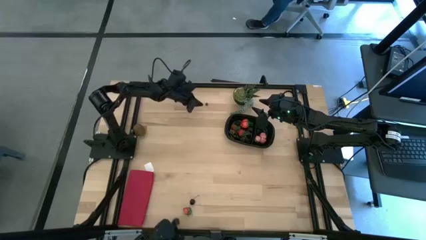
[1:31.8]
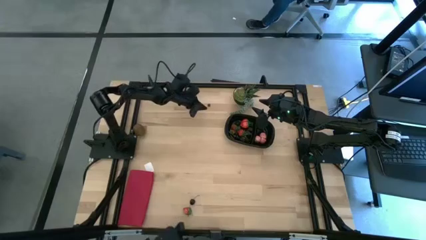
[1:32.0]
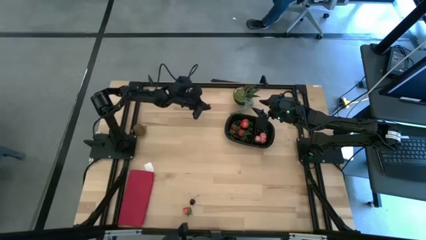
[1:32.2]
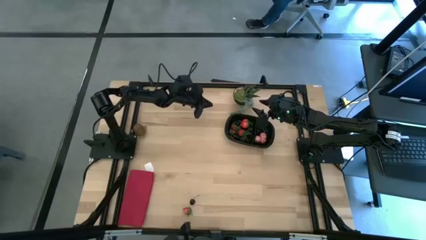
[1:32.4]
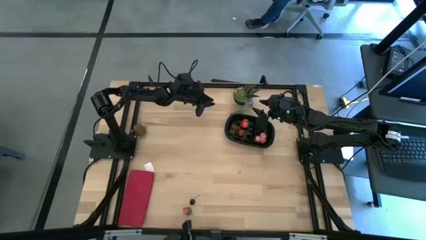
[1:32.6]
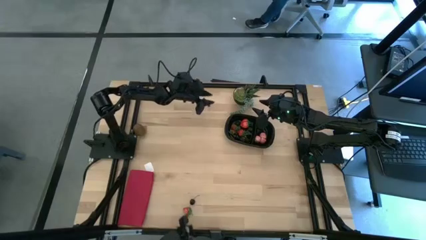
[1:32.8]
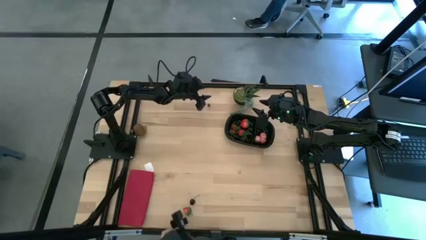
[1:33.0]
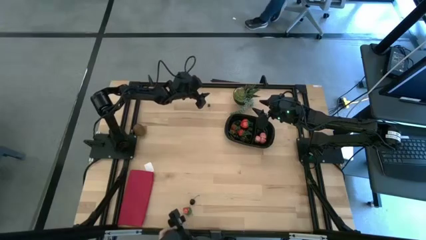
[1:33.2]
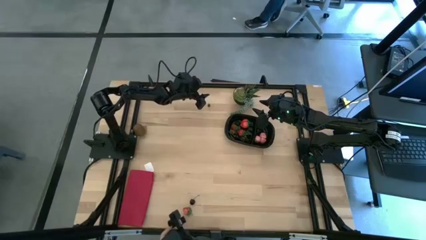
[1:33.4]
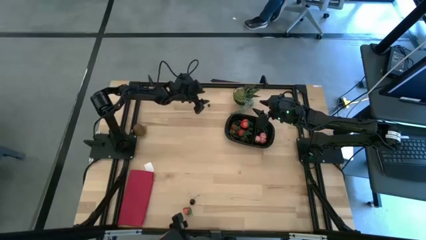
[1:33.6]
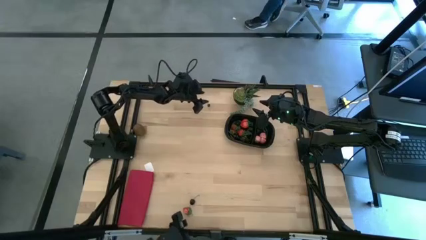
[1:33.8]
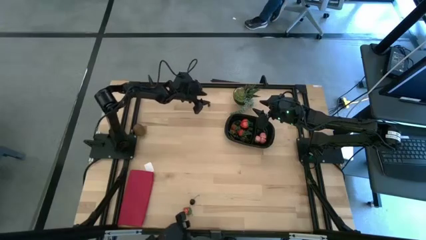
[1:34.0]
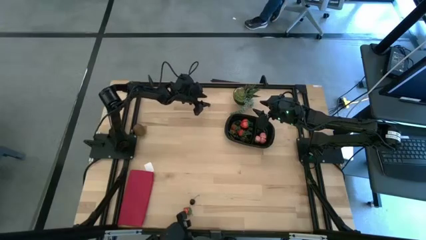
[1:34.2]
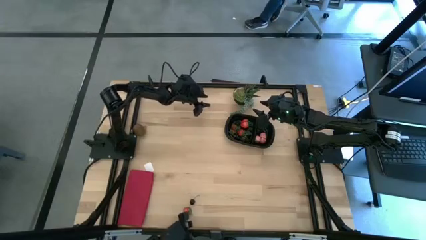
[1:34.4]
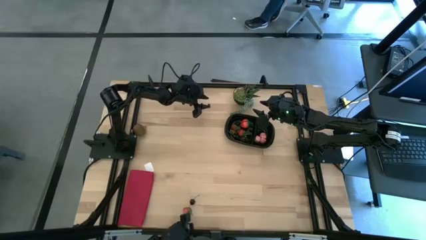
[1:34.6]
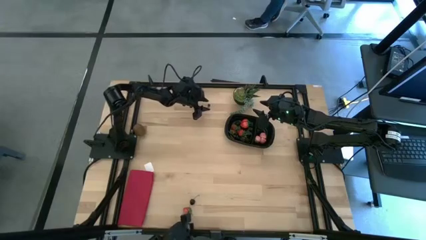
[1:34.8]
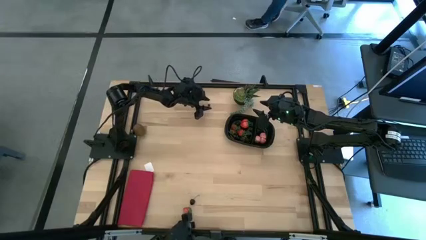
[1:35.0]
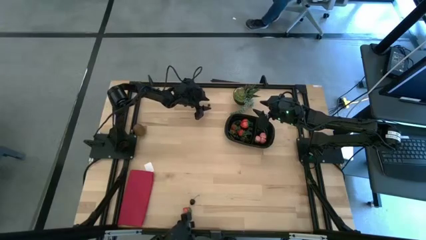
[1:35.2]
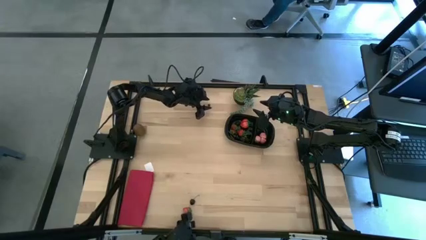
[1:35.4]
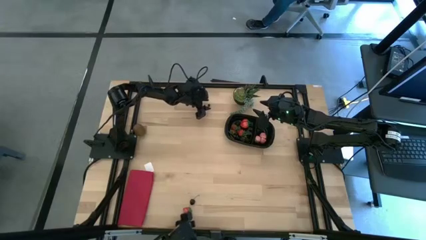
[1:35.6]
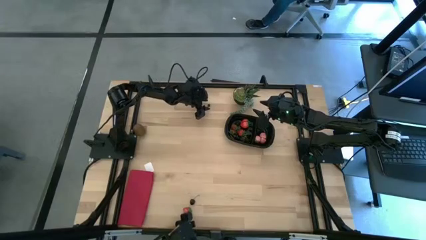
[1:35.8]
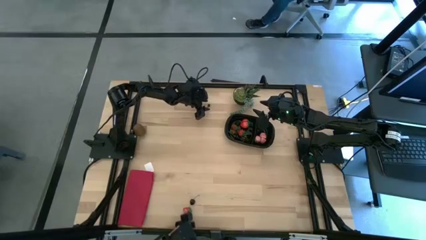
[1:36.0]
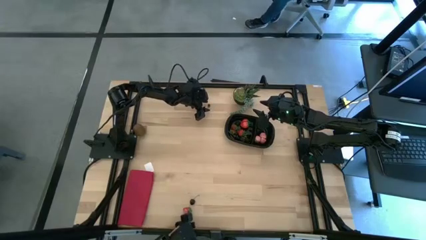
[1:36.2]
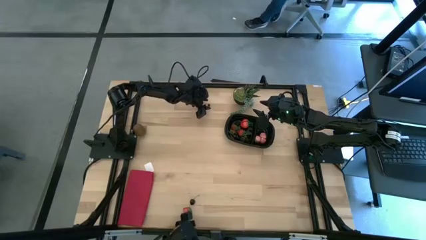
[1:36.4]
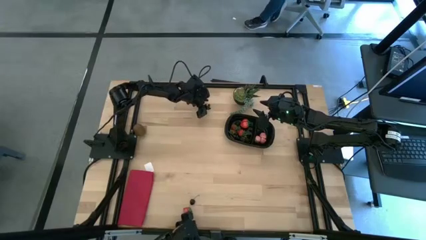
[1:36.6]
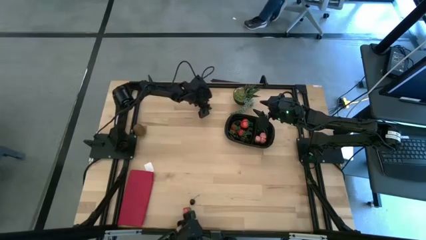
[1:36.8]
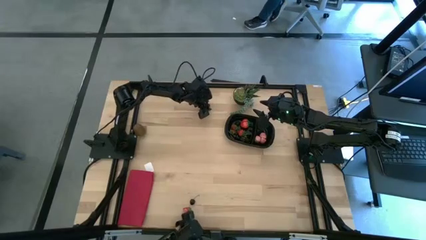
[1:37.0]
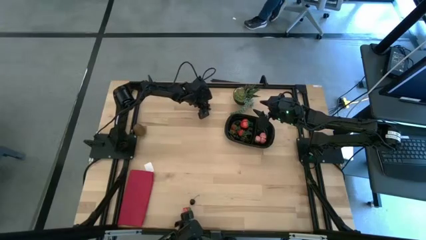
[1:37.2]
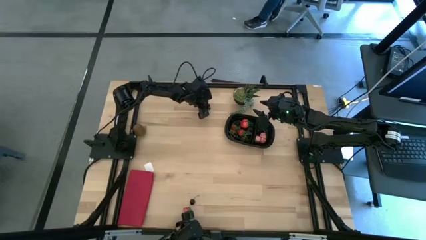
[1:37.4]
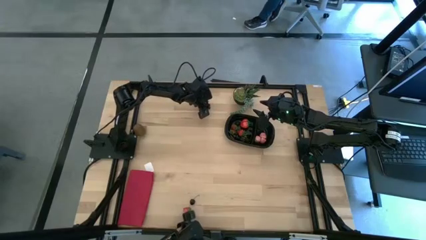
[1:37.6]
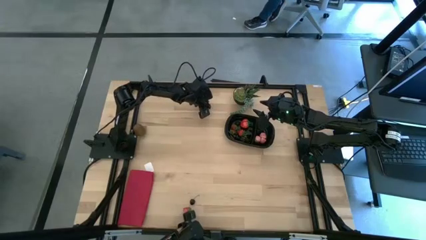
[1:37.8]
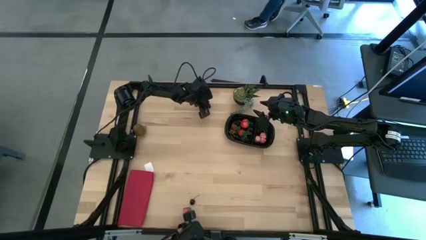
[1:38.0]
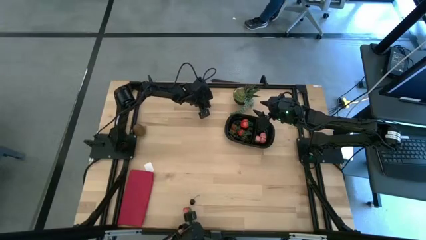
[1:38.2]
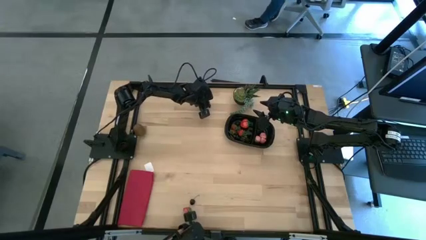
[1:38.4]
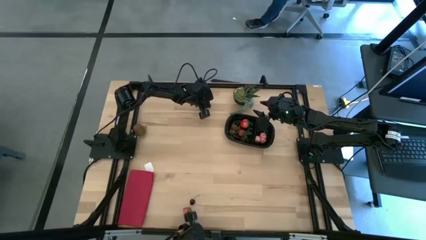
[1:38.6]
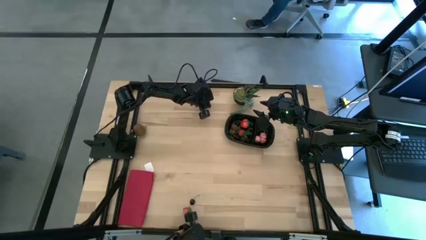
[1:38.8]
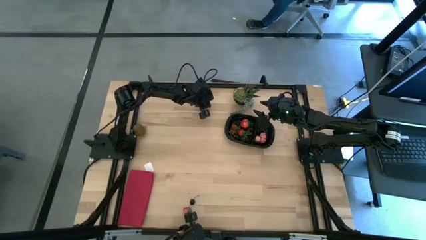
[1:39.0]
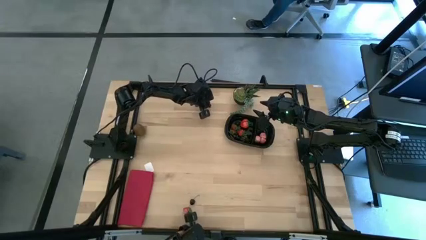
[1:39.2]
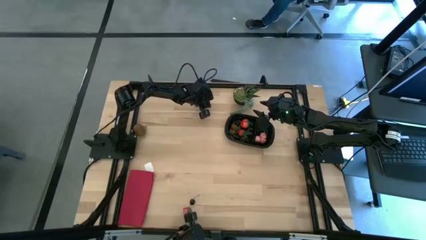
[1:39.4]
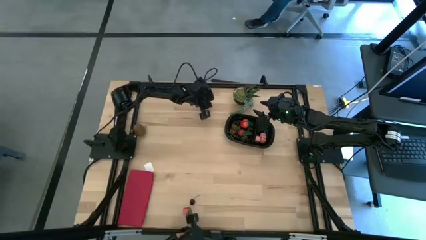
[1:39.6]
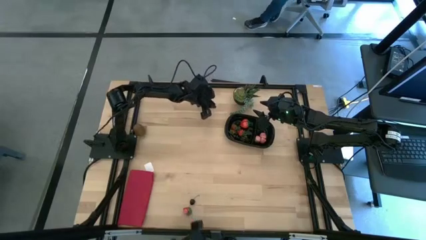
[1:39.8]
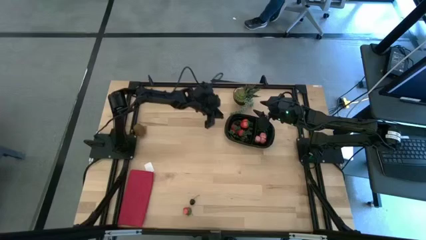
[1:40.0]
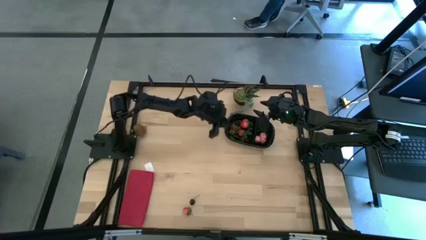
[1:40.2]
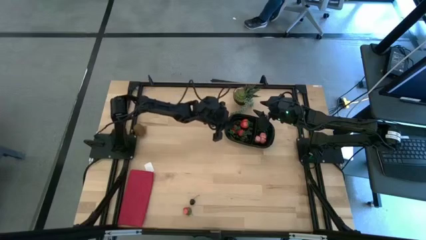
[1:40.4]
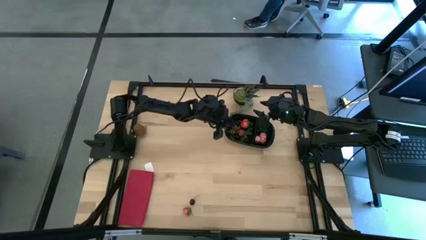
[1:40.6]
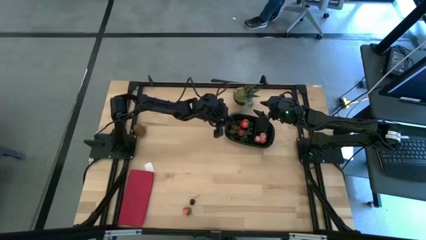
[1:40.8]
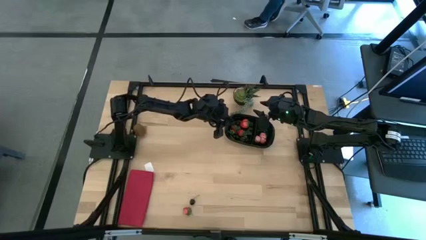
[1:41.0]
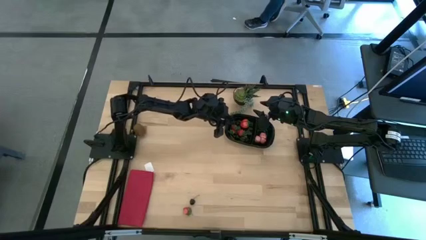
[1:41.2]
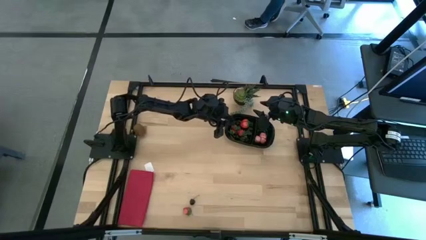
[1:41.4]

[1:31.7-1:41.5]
Task: Pick and placing Produce into tupperware
Put the blueberry into the of the black bin

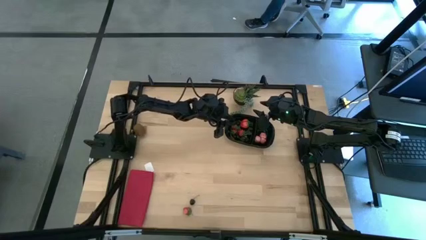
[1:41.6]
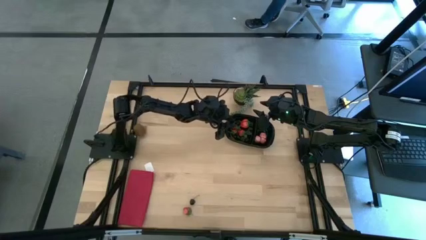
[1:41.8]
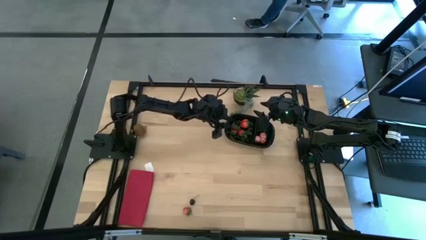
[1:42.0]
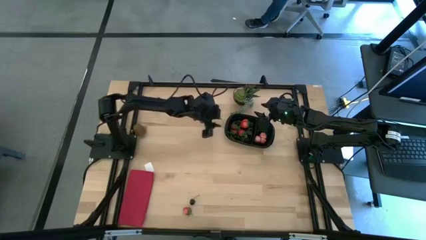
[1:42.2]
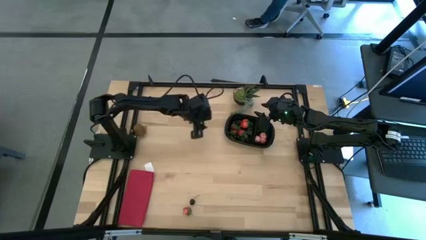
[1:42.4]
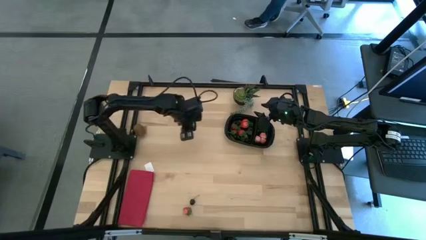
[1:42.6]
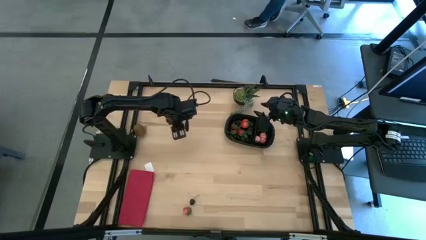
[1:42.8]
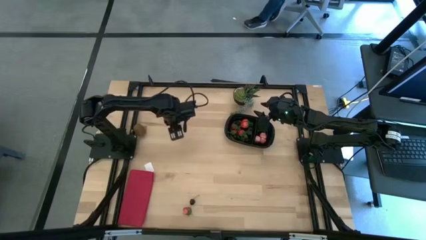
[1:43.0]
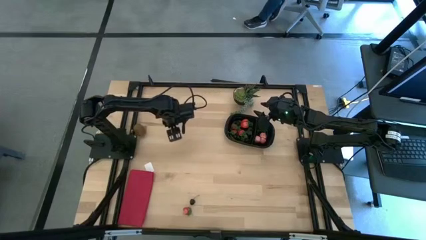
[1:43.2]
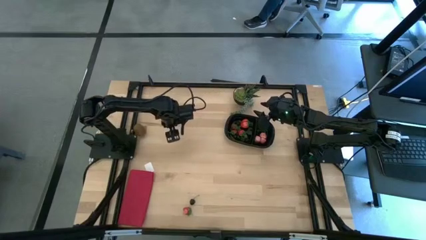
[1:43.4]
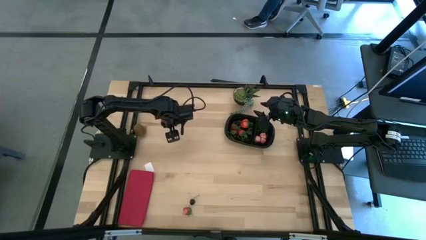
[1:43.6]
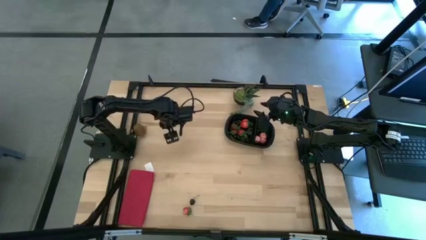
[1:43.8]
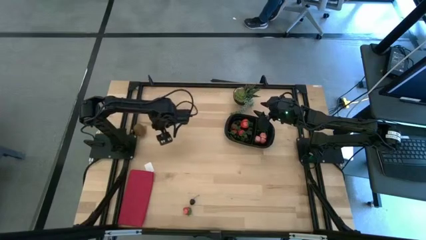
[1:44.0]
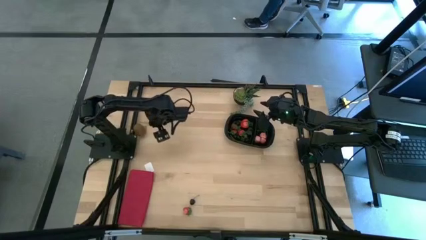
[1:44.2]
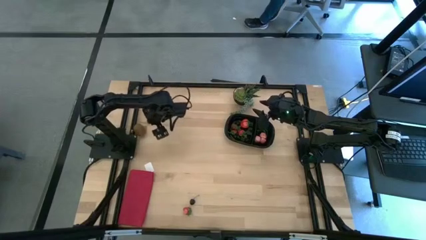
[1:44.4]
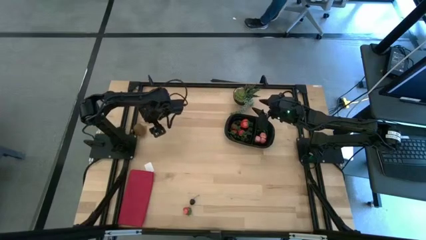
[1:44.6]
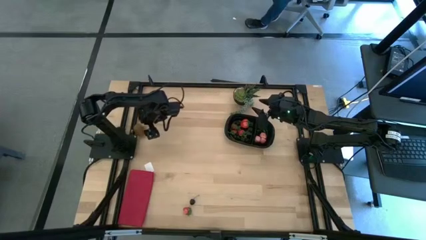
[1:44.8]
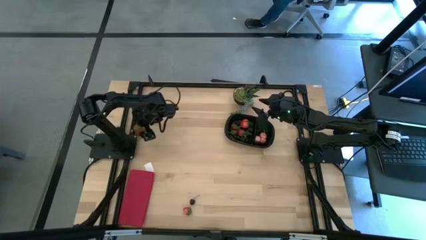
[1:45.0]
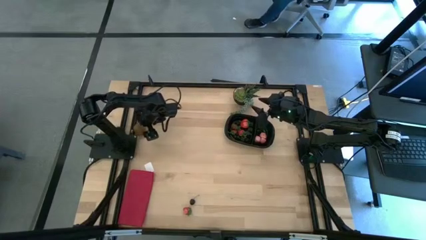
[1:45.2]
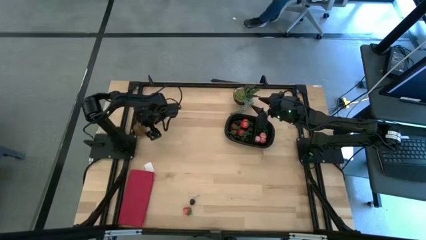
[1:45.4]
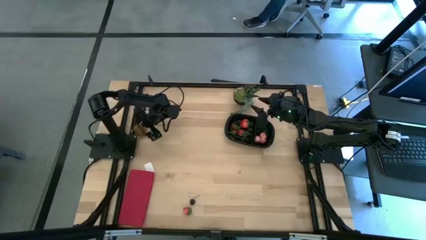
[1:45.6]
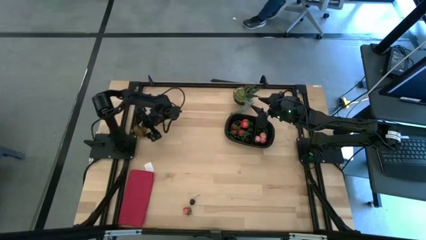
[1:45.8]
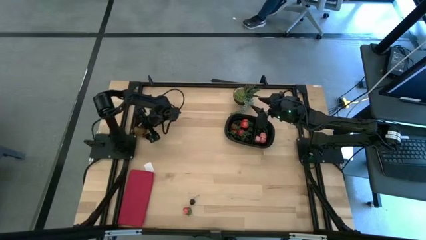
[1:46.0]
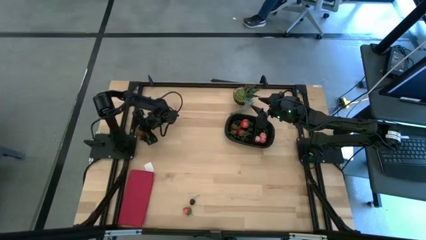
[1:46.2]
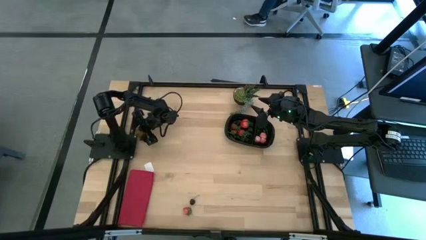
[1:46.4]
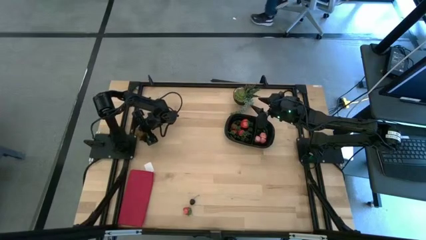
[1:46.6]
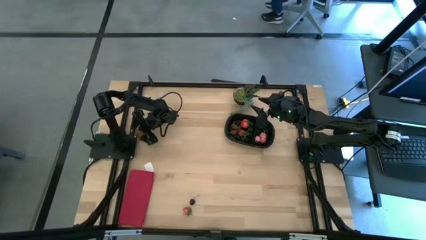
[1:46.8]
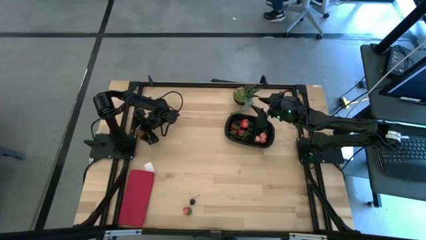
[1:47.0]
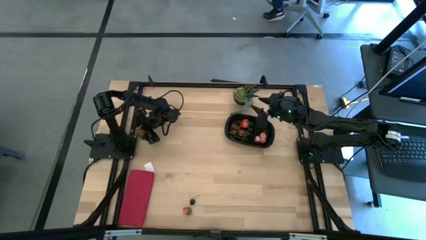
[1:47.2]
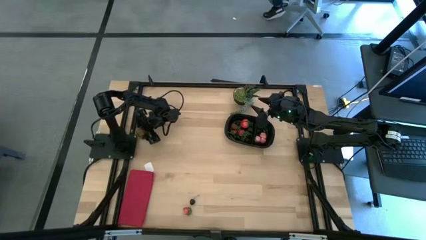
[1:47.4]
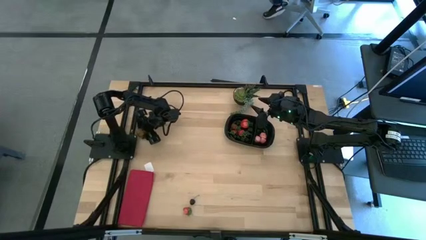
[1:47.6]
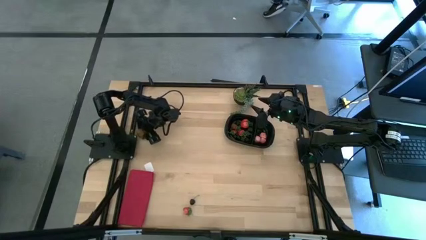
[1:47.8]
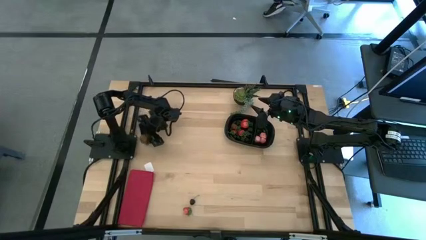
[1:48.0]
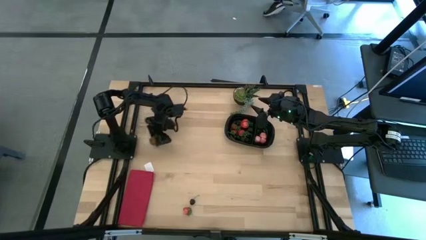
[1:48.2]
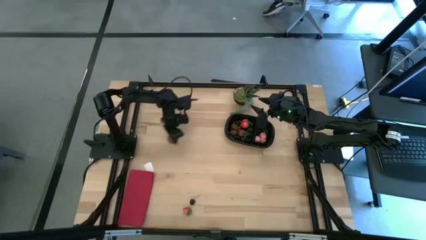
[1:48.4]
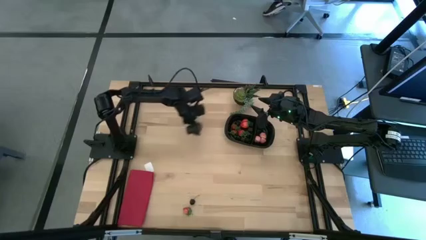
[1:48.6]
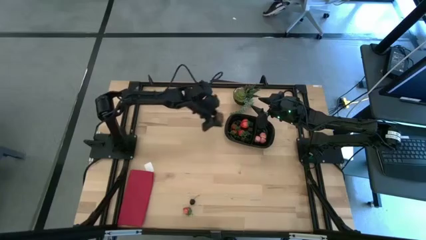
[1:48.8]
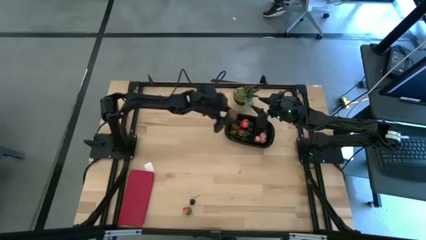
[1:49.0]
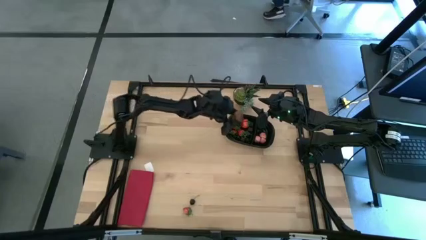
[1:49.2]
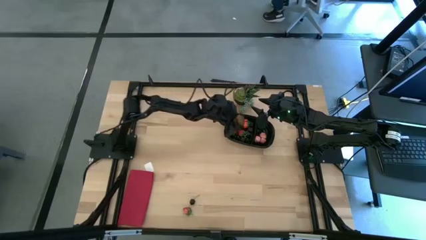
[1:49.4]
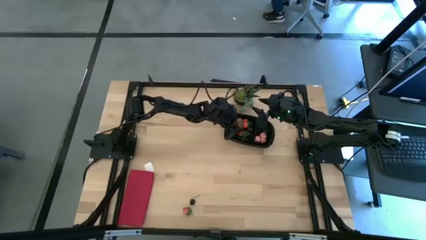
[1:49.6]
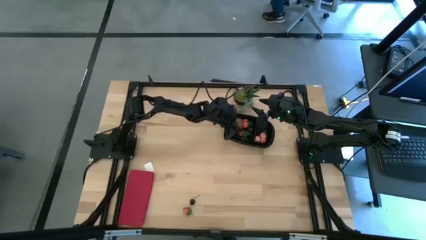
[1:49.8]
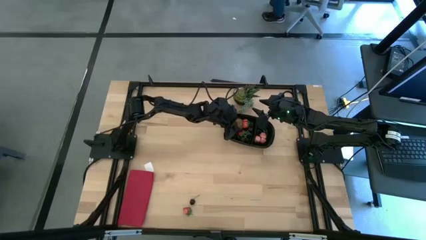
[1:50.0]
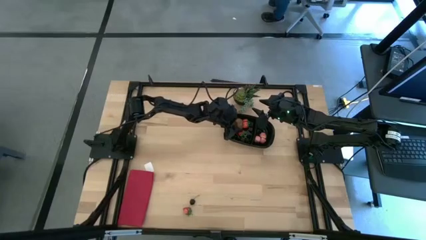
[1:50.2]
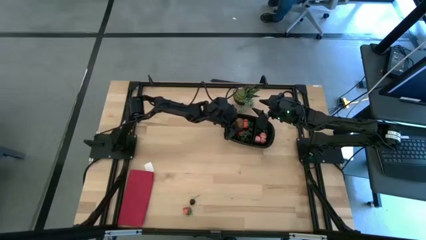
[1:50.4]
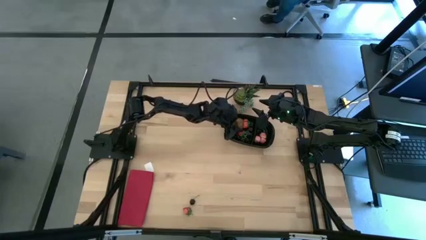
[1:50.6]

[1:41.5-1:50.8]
Put the brown kiwi into the of the black bin
